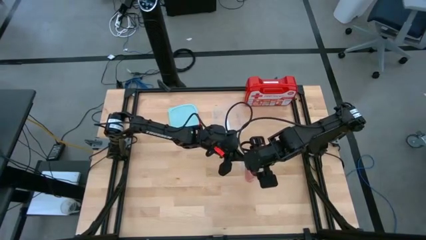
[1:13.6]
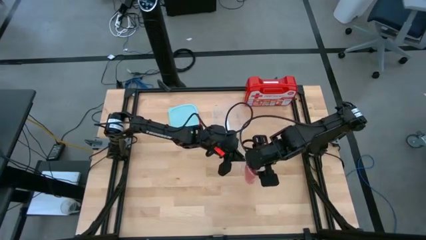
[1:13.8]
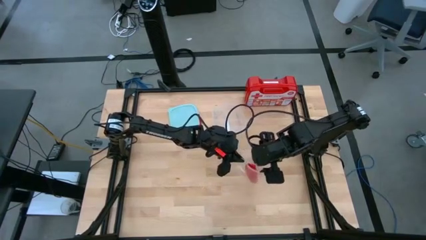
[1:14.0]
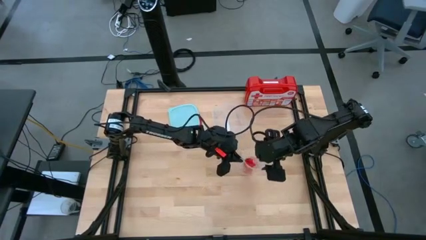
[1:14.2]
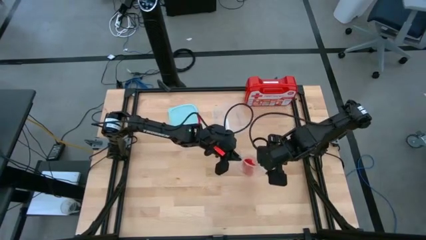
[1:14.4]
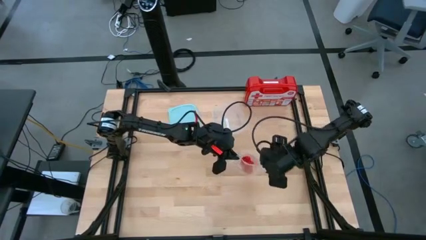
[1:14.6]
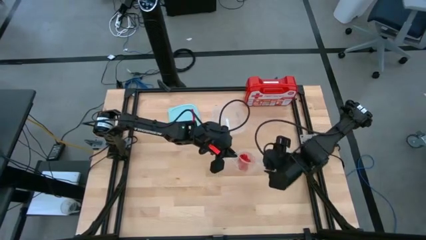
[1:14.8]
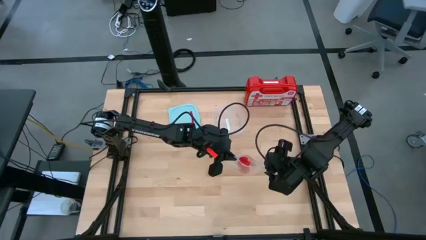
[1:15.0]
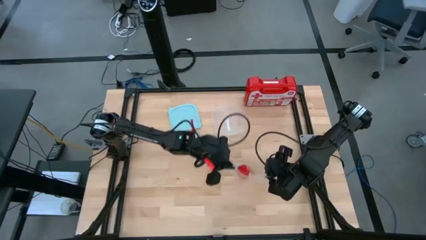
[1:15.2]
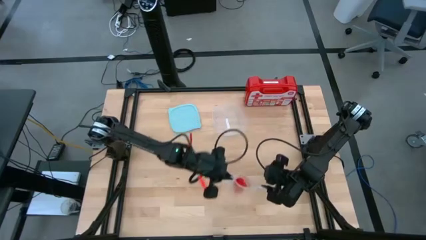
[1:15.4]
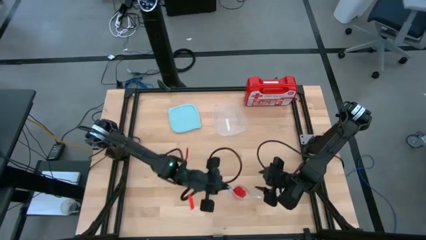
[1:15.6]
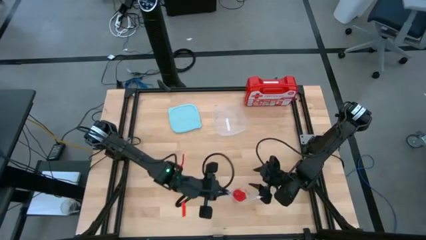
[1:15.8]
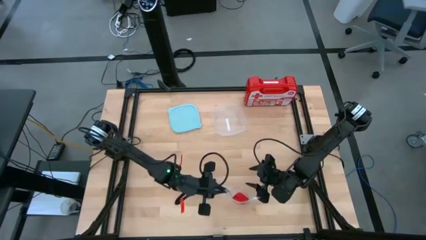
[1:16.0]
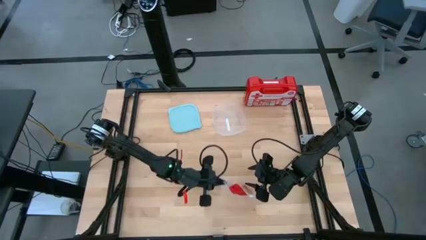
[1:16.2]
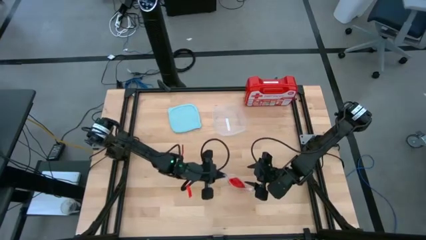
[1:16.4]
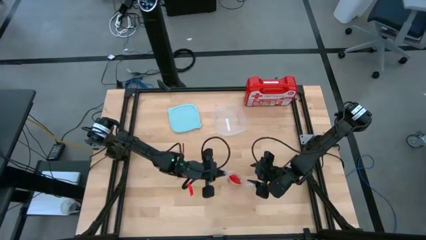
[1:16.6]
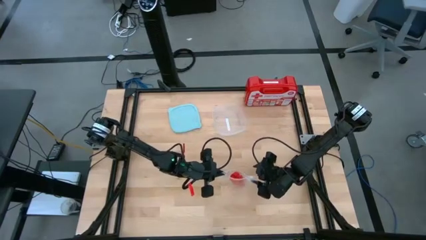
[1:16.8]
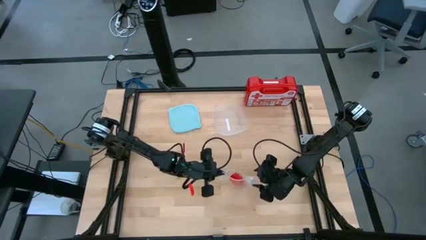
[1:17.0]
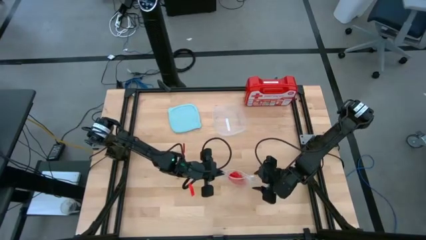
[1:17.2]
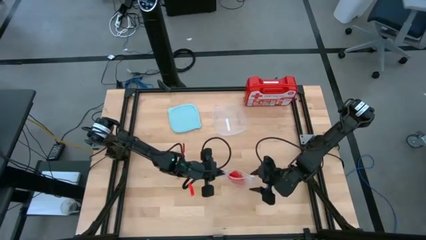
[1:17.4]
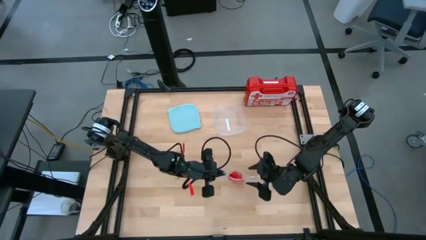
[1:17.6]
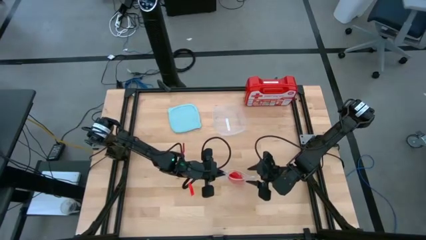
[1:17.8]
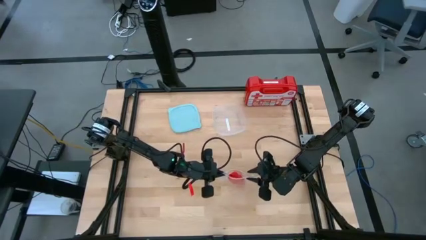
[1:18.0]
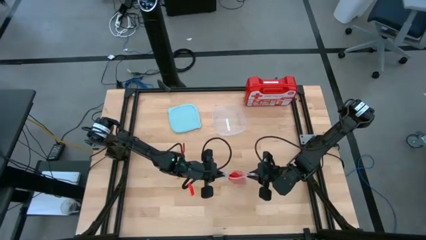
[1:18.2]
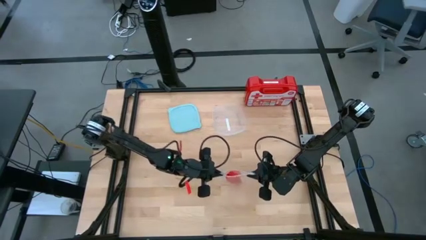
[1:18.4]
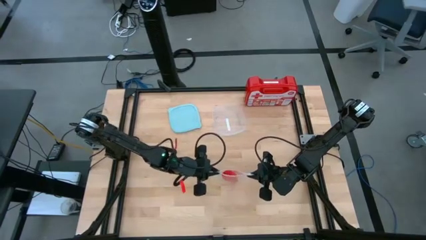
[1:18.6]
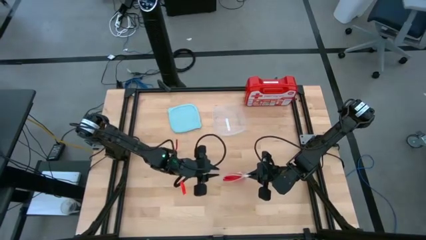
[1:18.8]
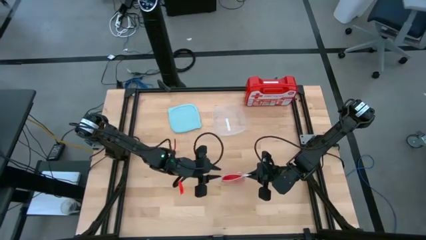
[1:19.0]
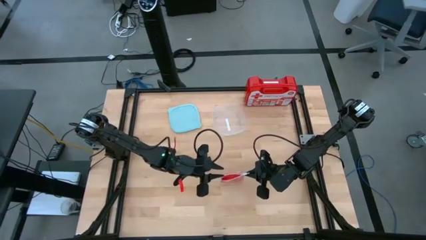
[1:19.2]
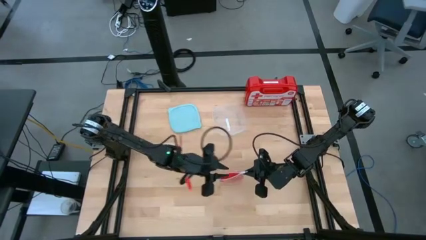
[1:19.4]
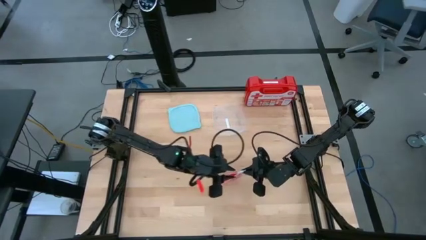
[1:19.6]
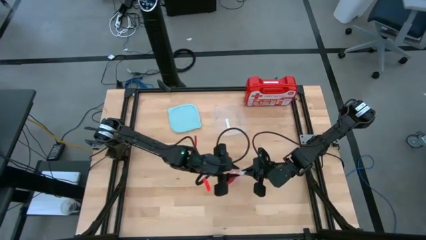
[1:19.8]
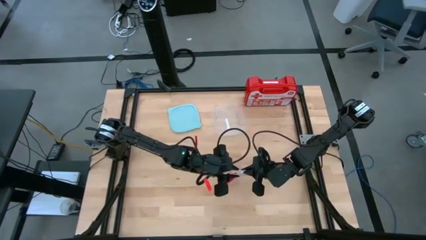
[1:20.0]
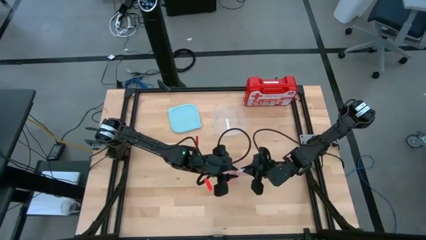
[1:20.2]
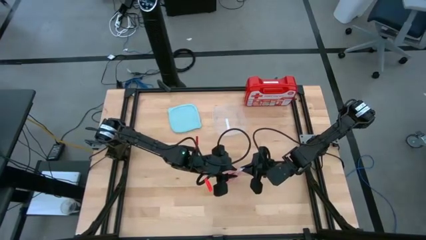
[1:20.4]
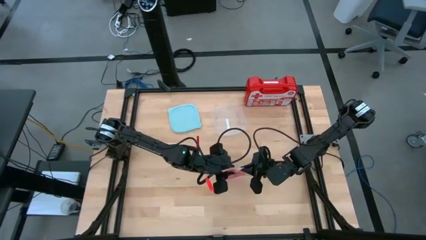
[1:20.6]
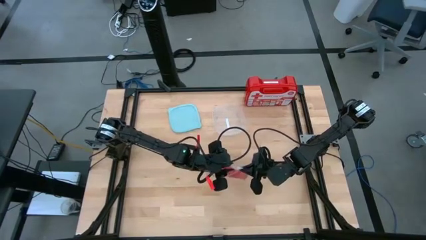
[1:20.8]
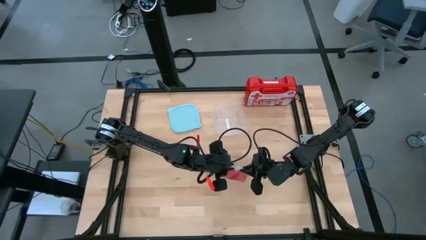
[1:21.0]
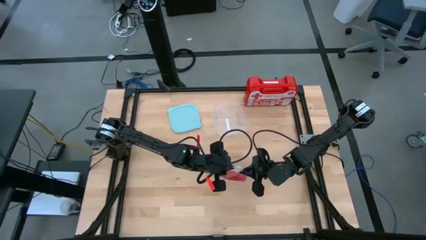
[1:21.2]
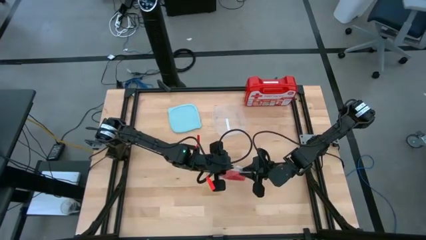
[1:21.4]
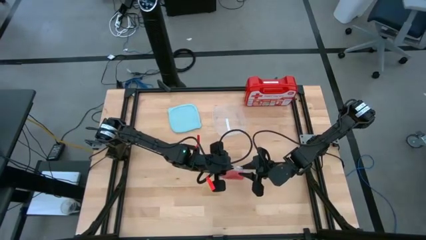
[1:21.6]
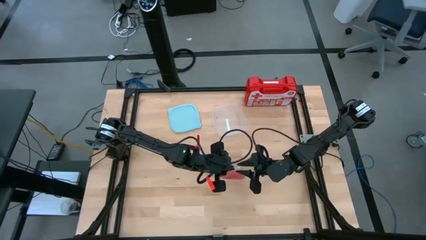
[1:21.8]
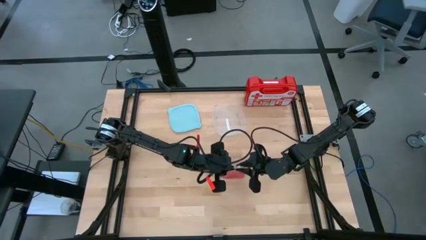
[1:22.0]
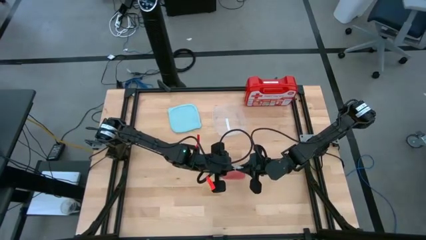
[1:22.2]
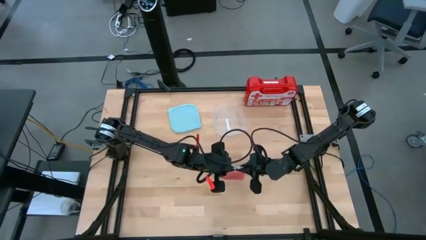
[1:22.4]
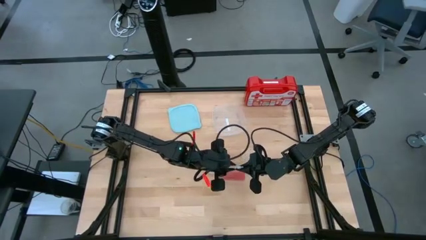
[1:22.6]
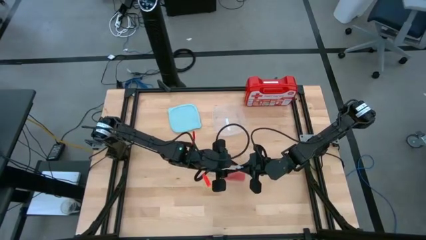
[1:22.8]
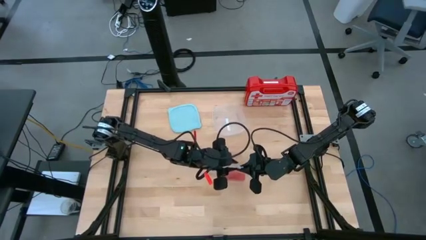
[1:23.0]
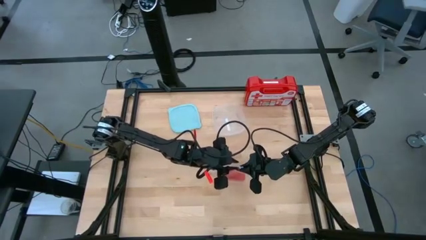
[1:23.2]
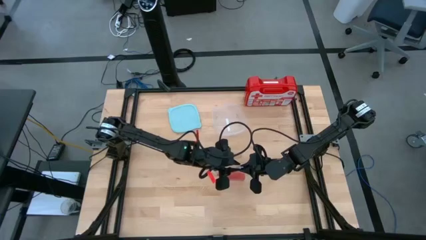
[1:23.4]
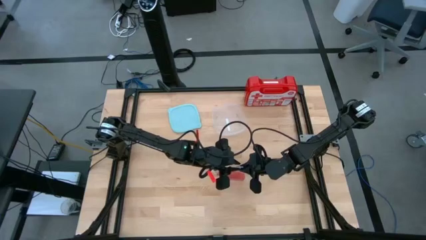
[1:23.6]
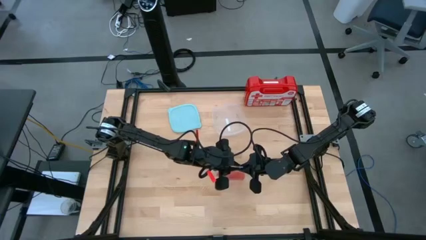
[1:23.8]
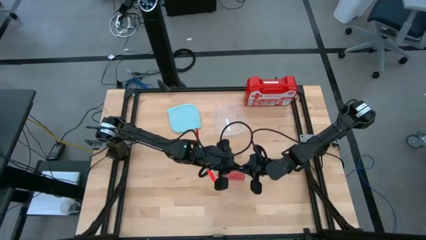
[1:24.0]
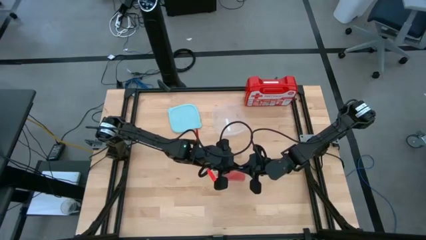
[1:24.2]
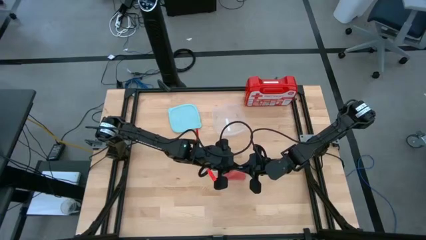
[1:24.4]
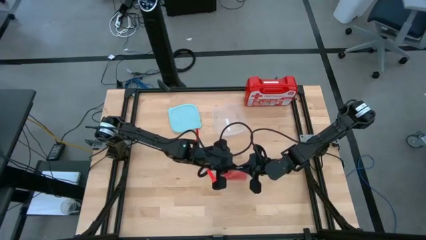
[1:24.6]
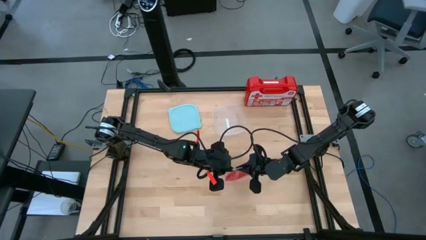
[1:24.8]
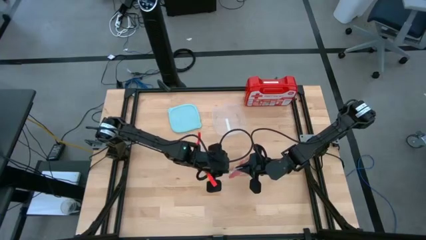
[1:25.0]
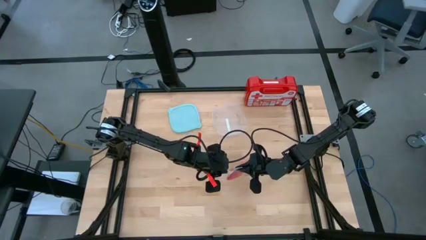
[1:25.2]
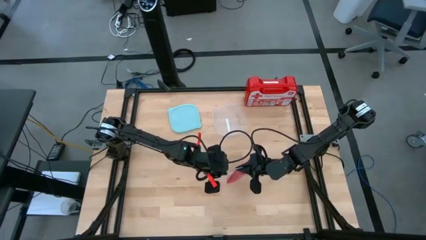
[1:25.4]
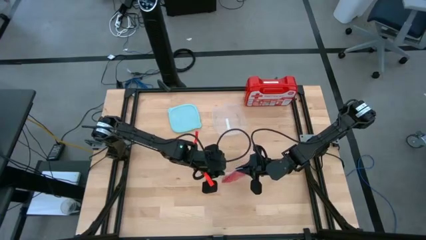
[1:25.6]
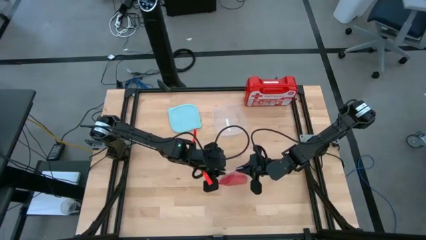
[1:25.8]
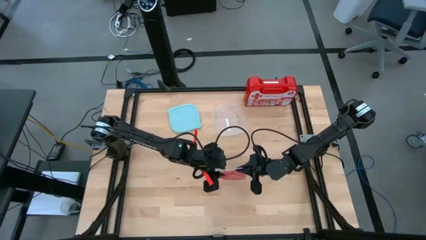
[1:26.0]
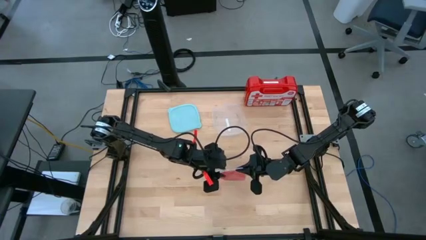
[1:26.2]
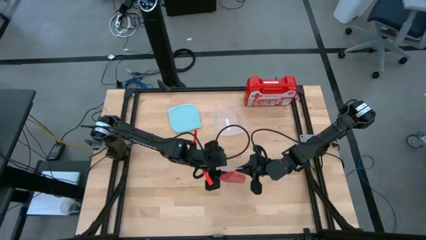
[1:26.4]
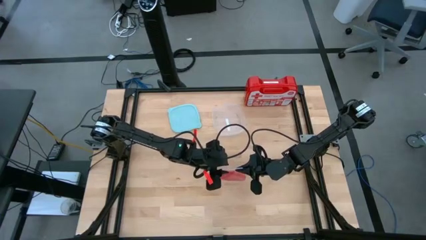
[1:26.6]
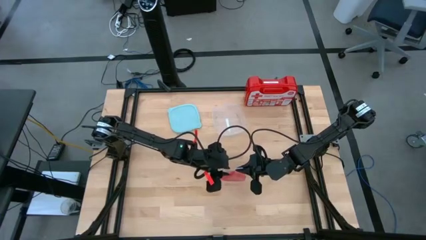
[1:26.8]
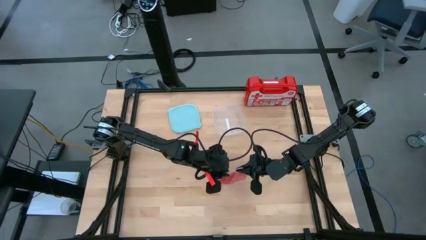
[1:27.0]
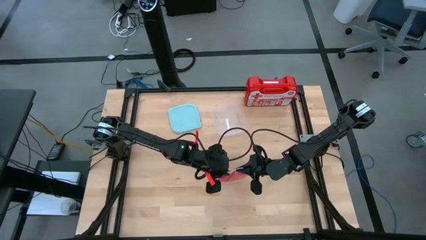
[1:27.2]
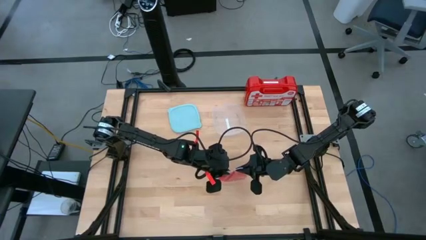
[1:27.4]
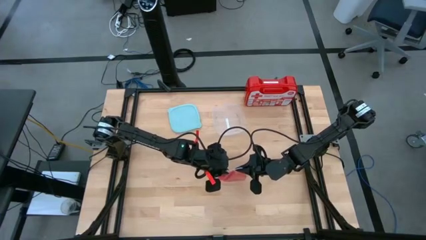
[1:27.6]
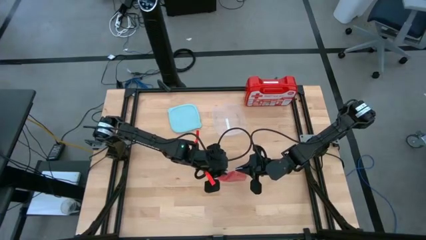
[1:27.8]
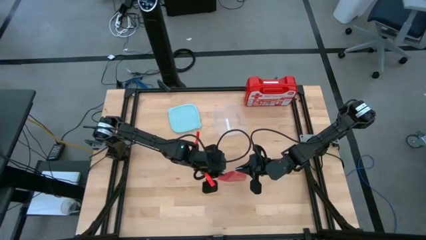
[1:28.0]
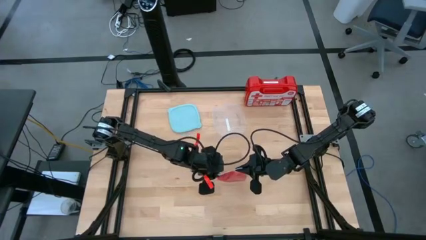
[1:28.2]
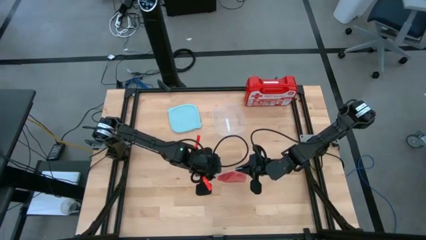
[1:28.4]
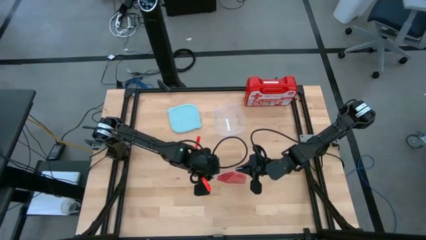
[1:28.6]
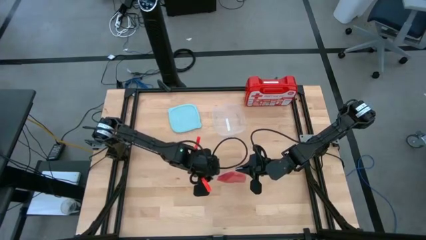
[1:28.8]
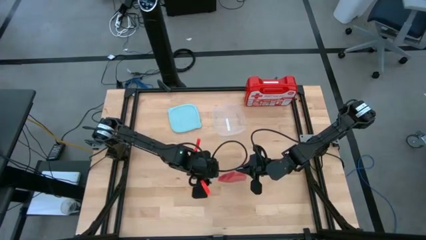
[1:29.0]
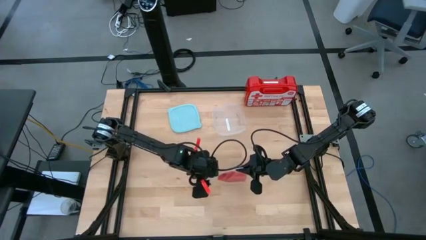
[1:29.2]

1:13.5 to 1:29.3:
Task: Roll bandage
Close the transparent zip bag

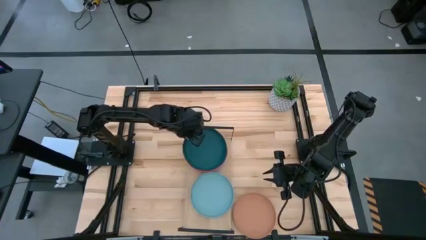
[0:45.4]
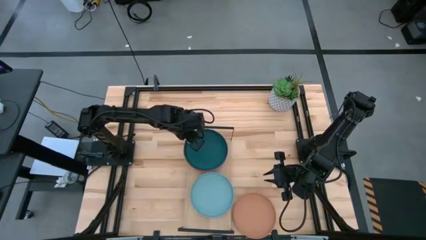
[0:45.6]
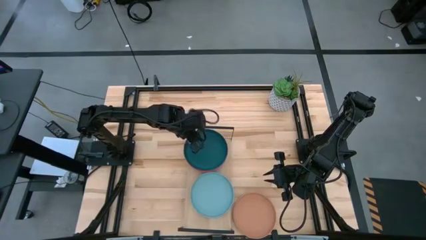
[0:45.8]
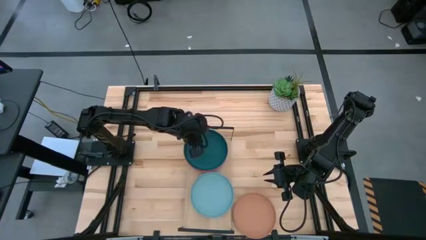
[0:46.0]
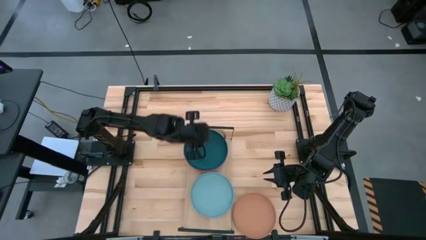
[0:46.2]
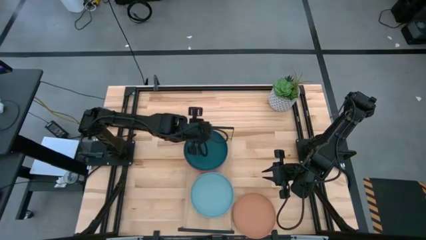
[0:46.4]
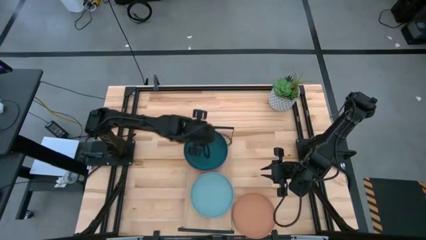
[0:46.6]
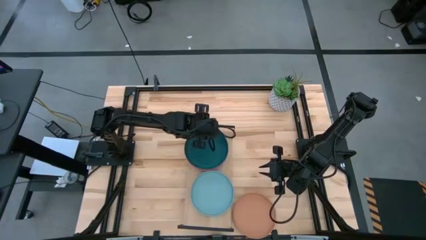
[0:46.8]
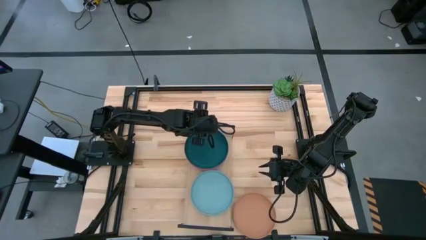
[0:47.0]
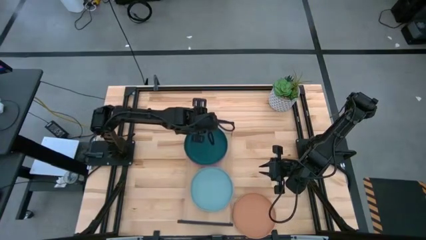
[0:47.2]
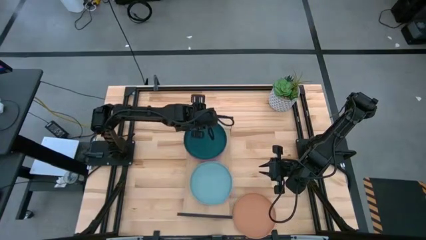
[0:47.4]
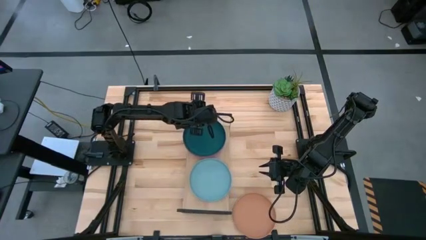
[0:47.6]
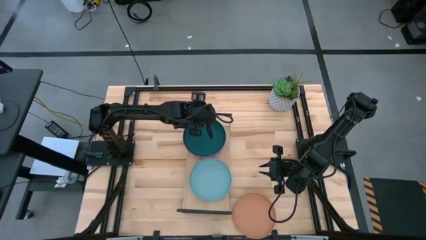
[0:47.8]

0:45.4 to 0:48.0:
Task: Place and stack plates onto a shelf
Adjust the shelf
